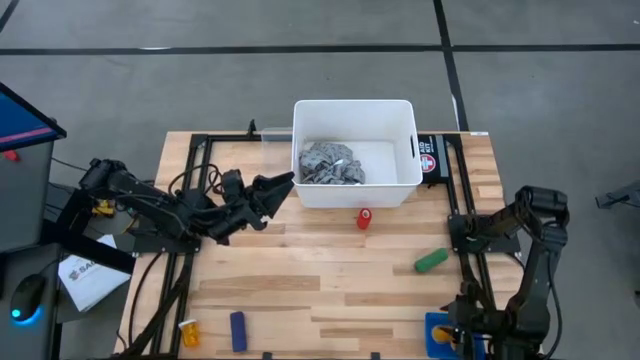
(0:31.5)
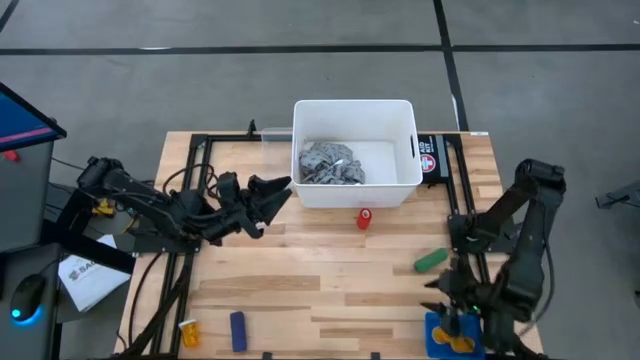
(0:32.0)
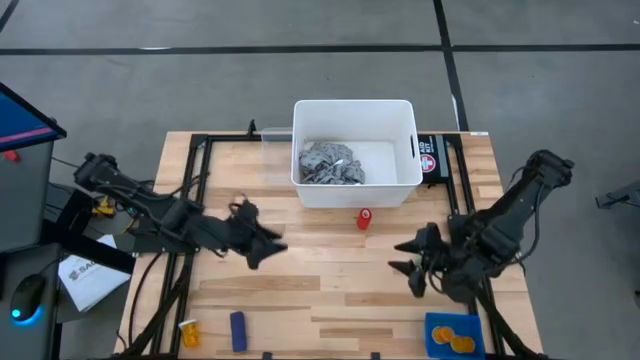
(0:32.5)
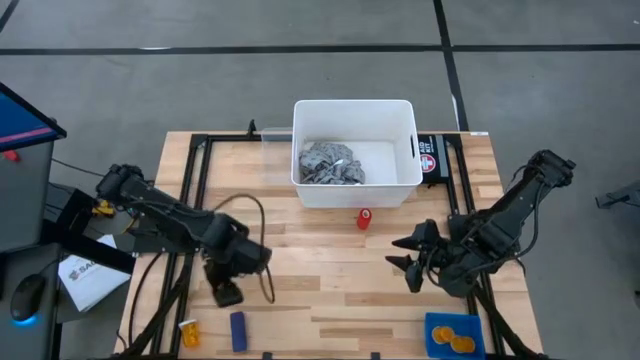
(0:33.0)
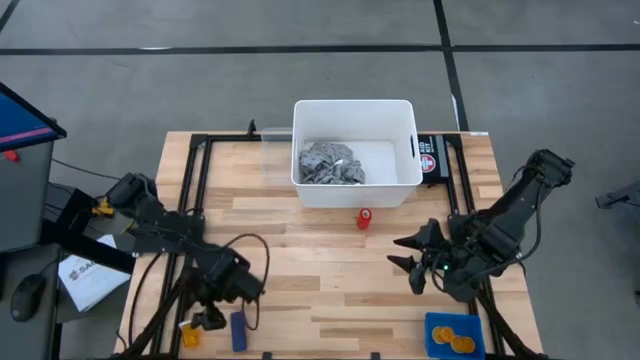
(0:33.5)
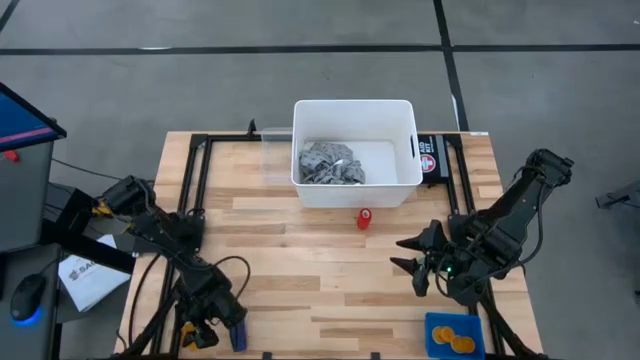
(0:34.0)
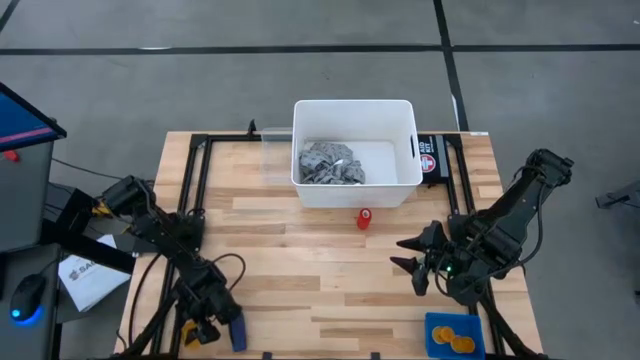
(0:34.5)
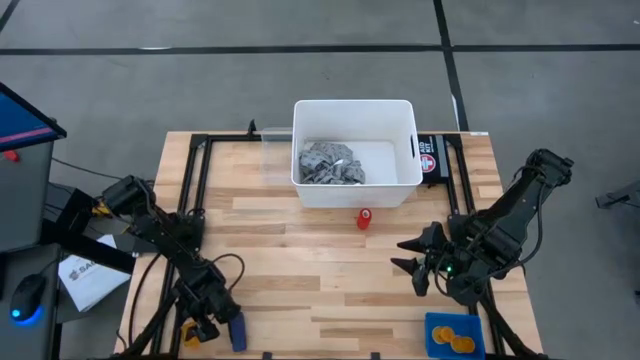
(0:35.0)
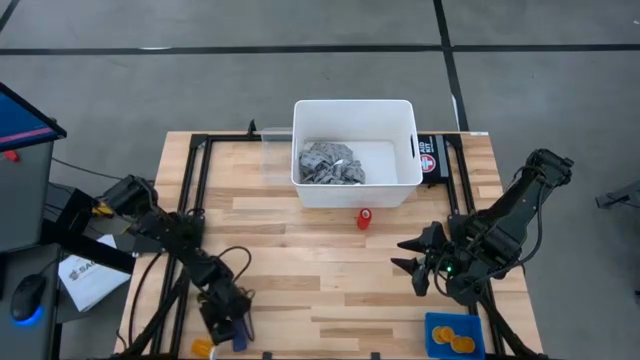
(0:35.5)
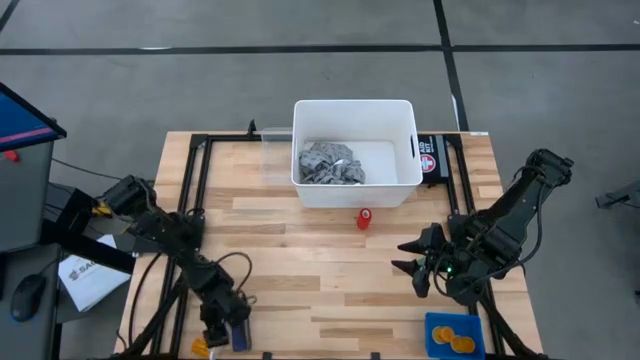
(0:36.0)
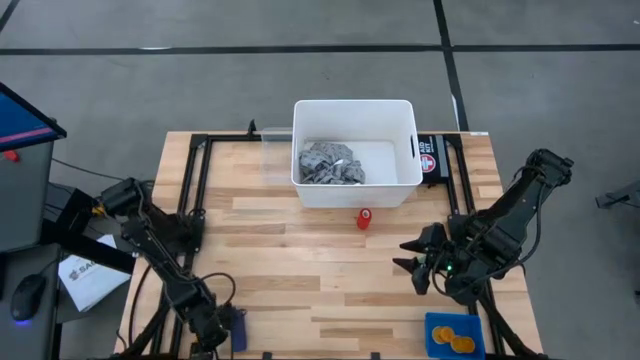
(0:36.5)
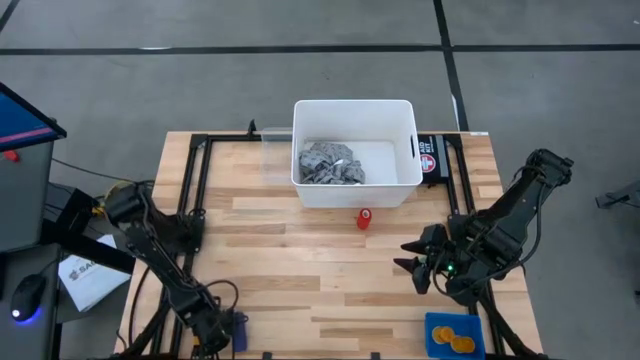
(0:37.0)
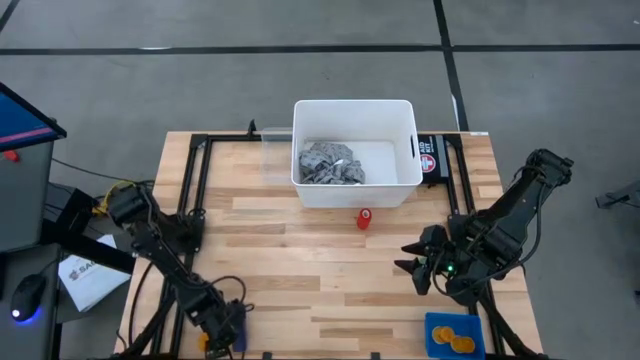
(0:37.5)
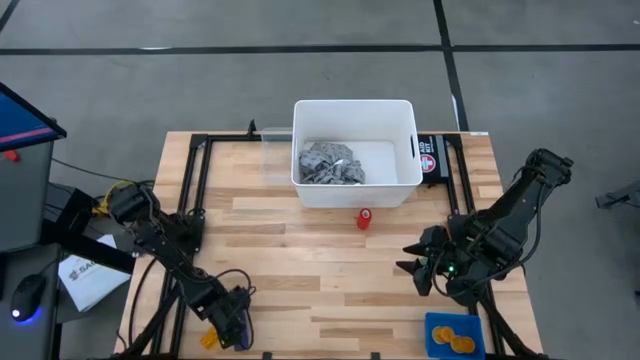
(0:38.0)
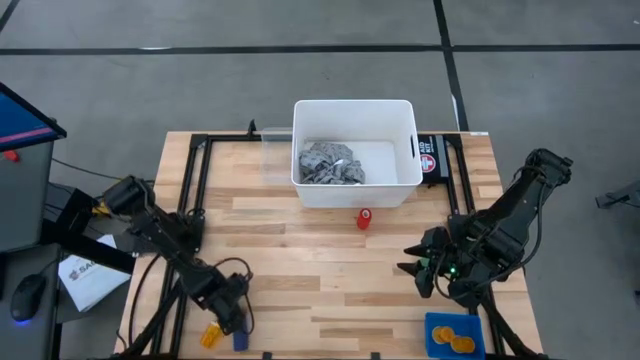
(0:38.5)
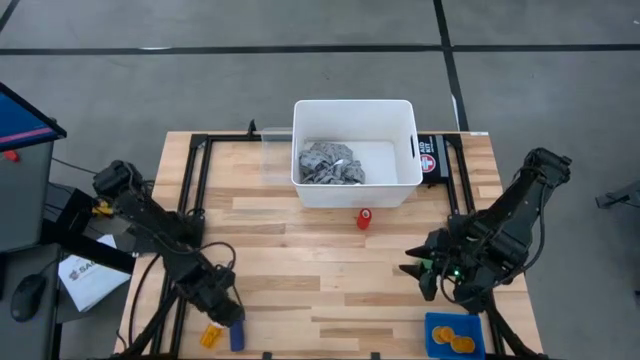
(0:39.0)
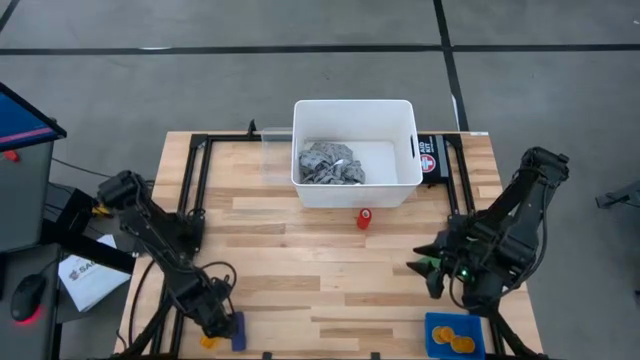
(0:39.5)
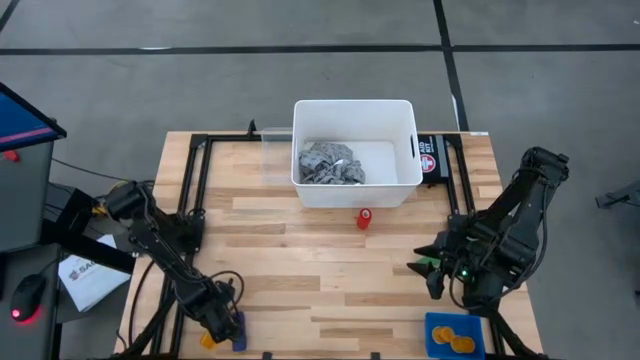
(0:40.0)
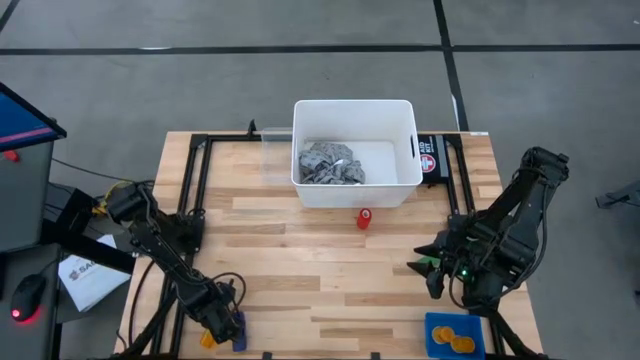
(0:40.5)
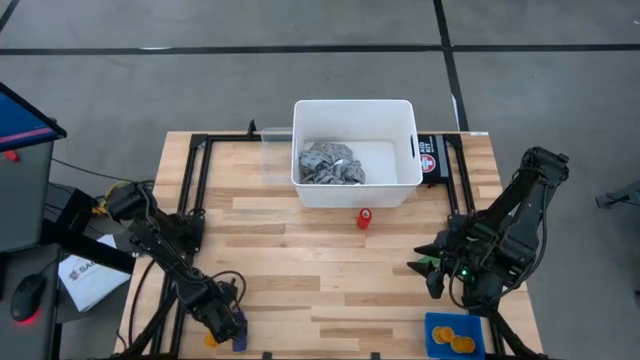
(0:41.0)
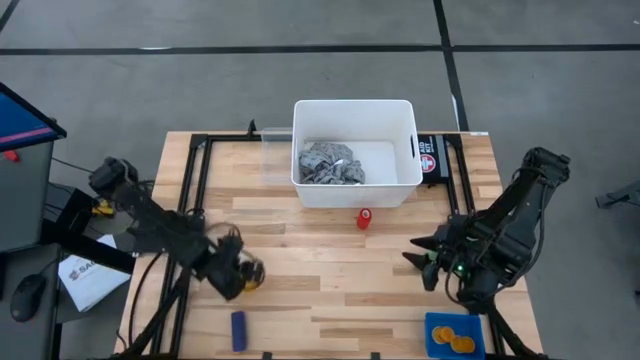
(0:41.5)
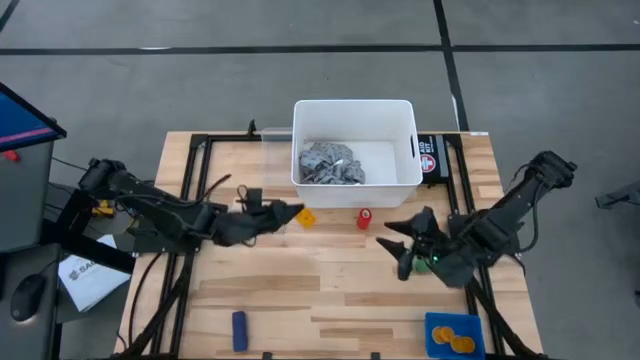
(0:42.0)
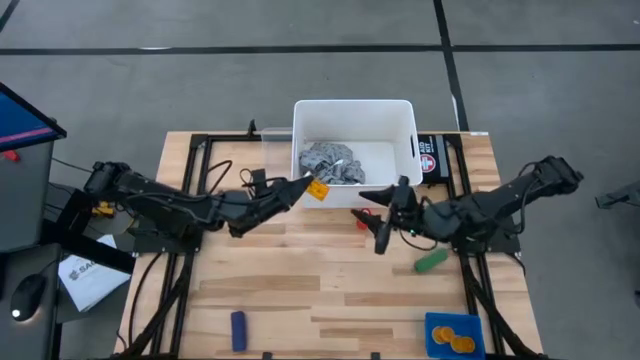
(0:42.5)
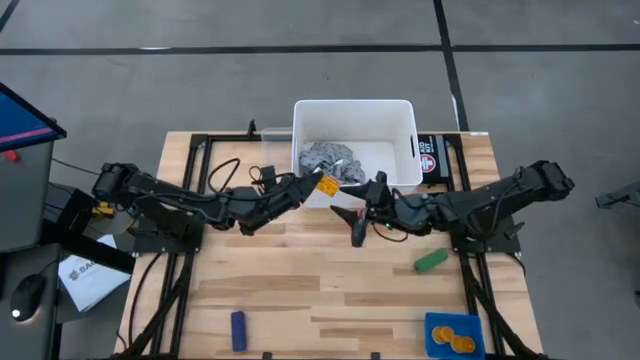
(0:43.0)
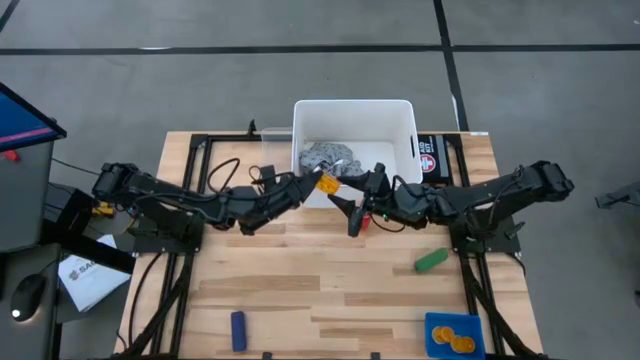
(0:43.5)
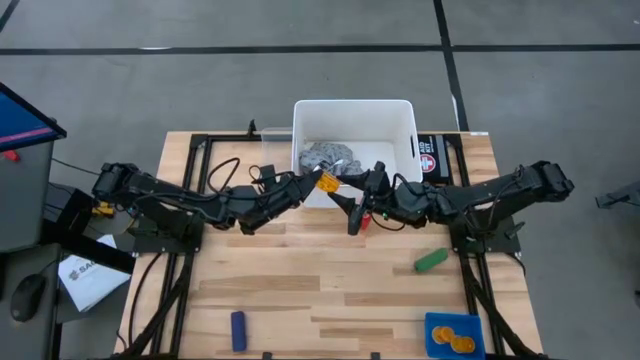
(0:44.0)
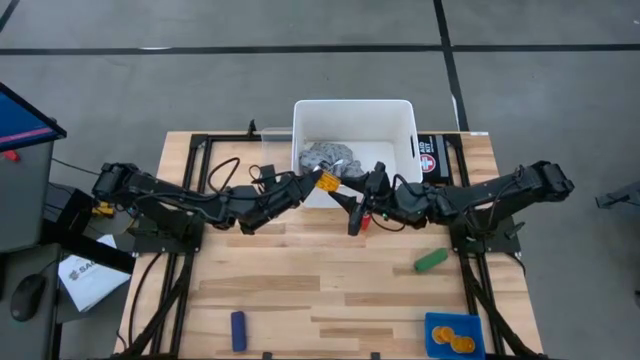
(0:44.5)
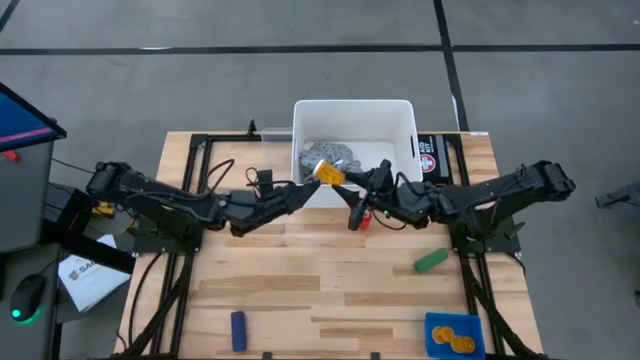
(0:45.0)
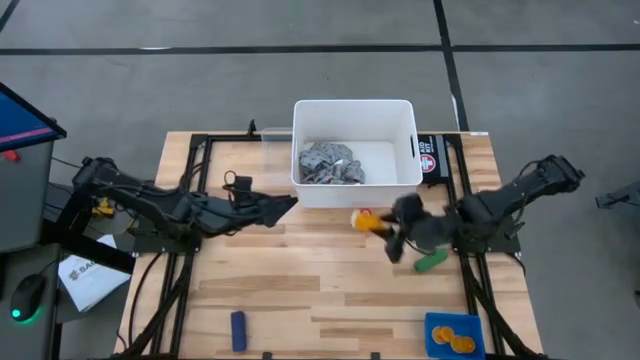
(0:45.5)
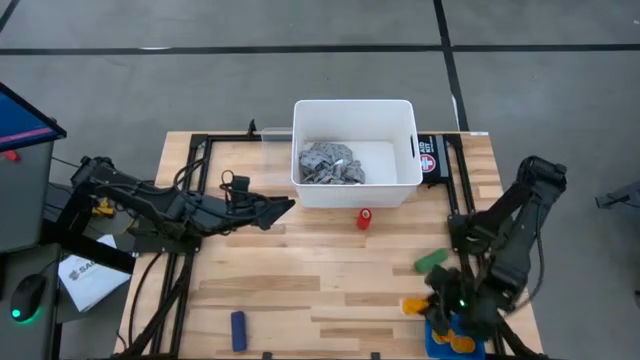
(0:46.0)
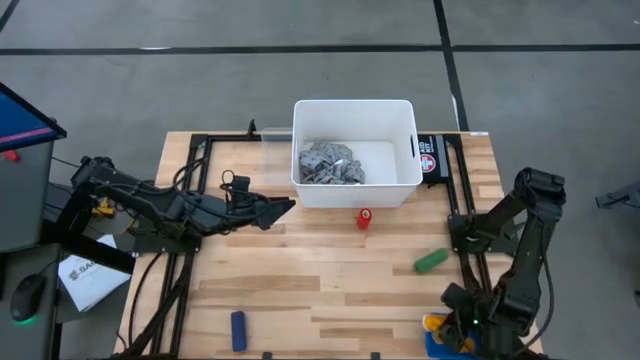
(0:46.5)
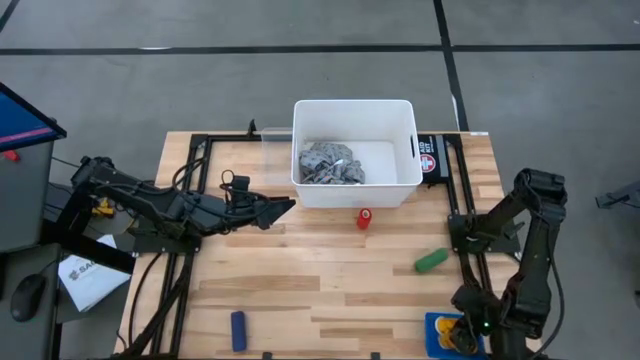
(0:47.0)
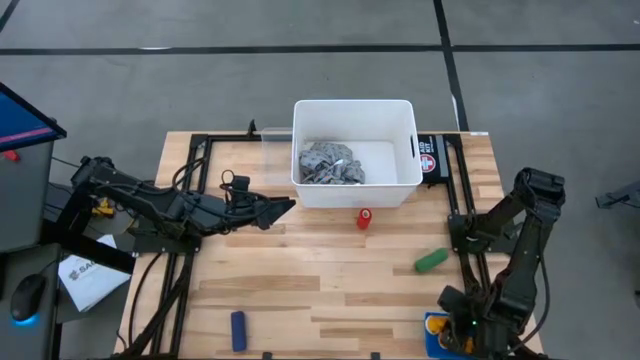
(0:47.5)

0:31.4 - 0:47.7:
Task: Pick & Place Medicine items
Put the orange pill bottle into the blue bin

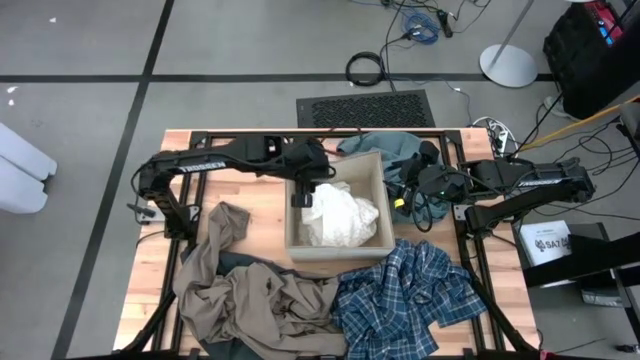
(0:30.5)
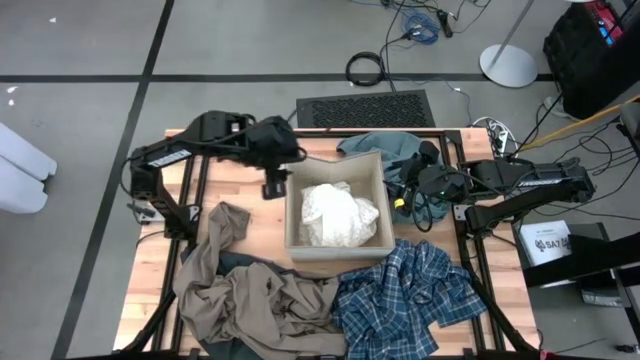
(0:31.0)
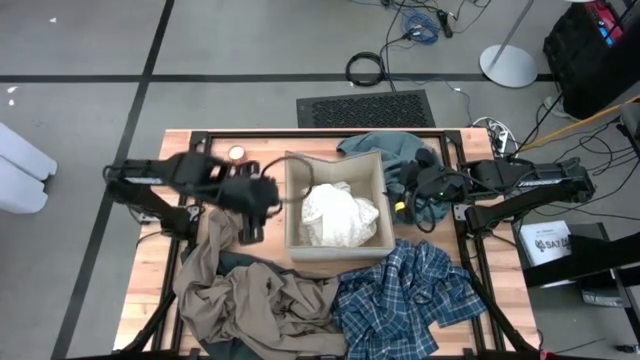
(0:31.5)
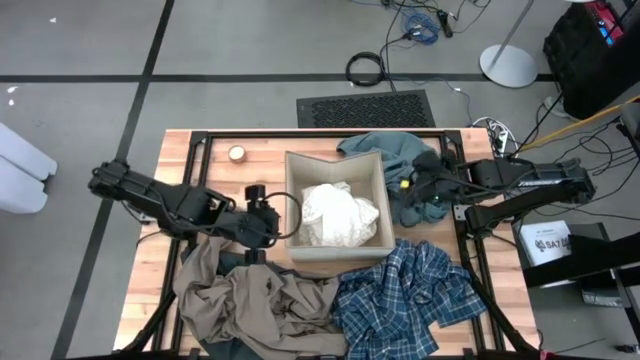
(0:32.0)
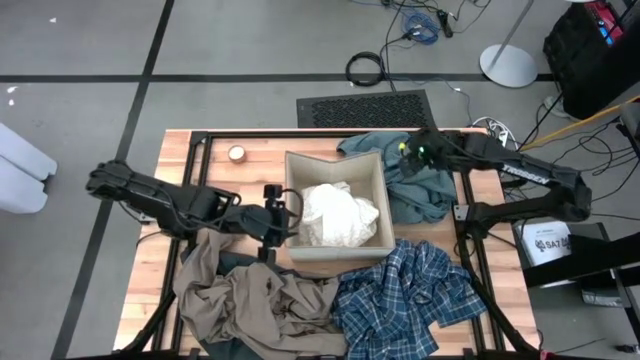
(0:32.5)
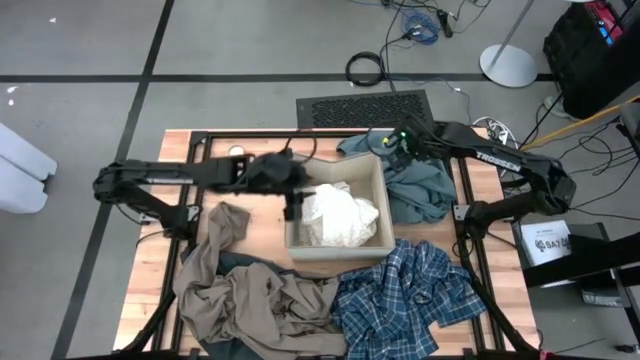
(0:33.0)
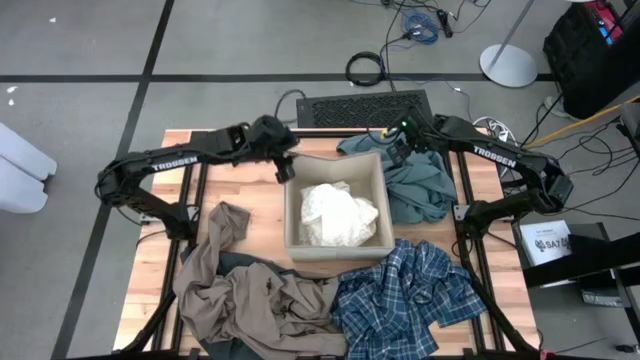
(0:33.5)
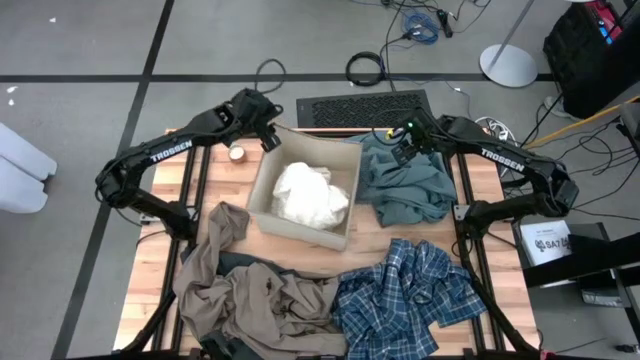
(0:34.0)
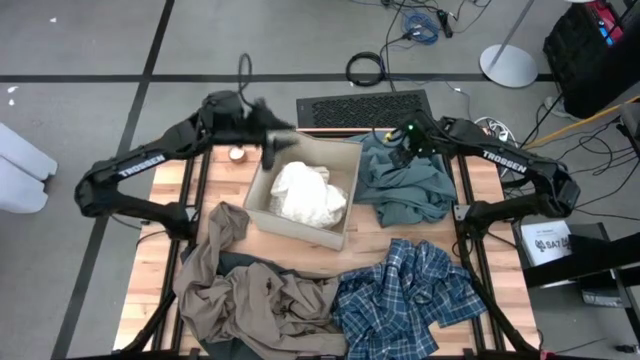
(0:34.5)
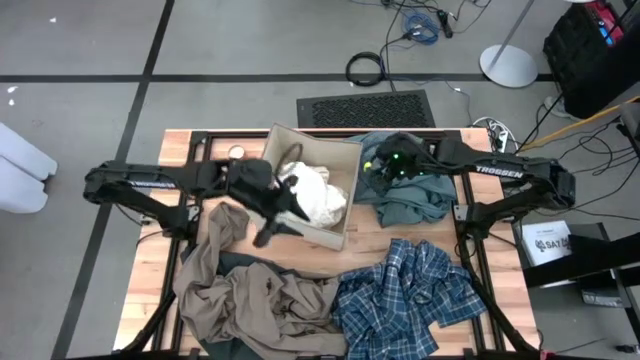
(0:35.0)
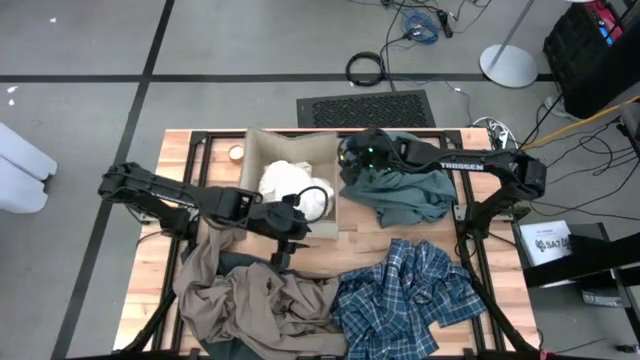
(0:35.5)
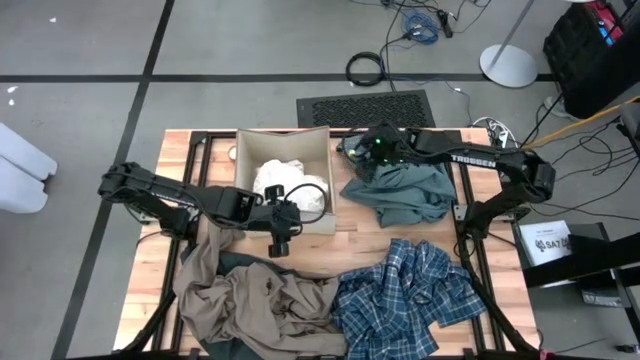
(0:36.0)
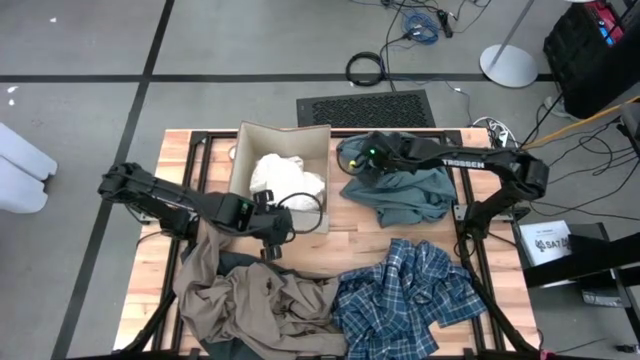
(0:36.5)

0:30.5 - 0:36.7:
Task: Sort clothes
Move the white laundry bin to the top left of the table
